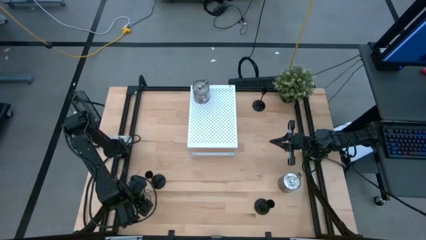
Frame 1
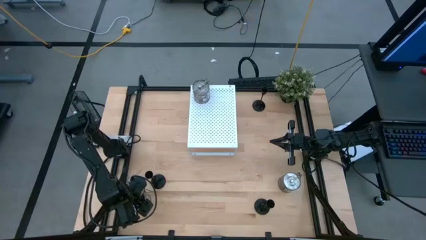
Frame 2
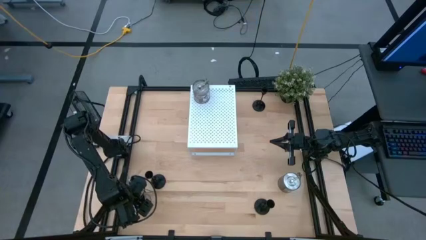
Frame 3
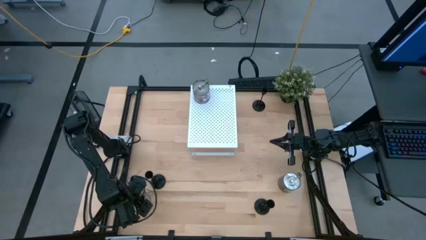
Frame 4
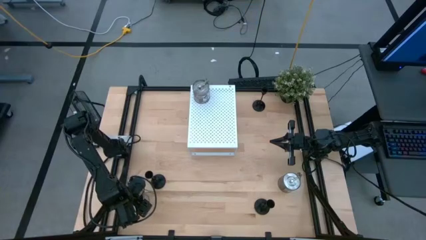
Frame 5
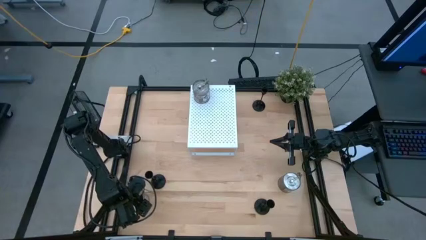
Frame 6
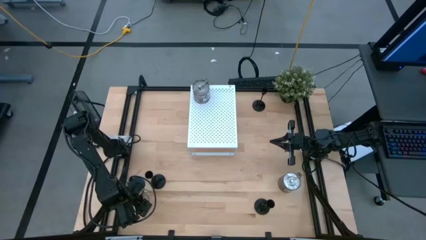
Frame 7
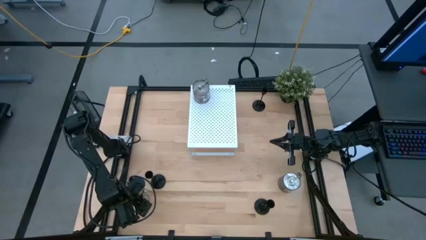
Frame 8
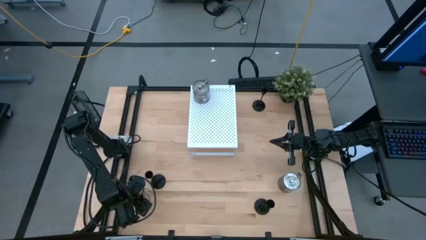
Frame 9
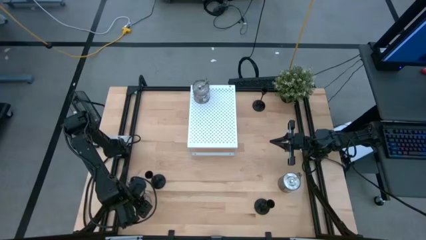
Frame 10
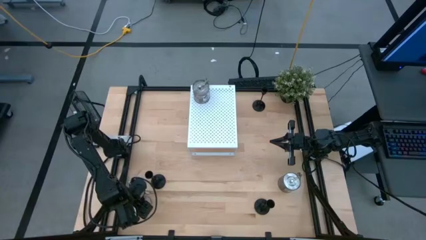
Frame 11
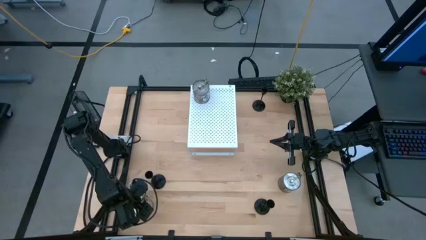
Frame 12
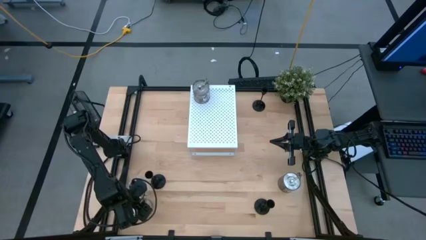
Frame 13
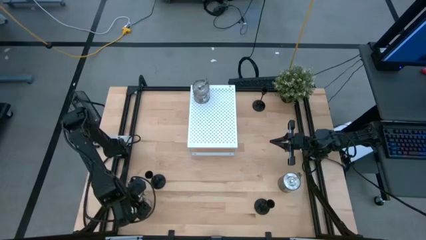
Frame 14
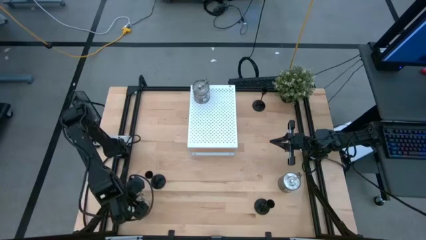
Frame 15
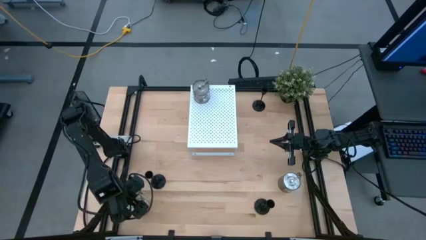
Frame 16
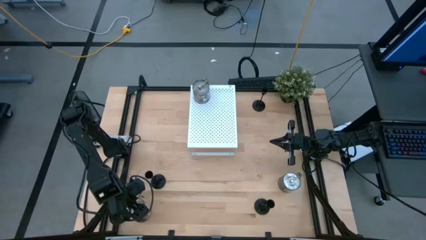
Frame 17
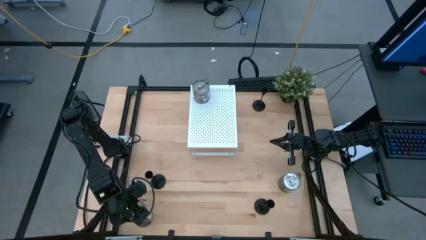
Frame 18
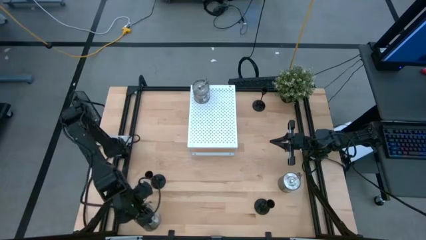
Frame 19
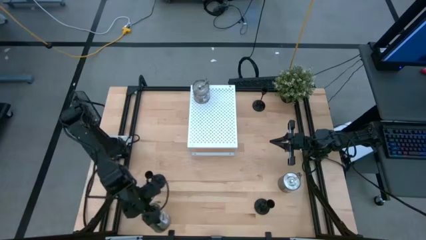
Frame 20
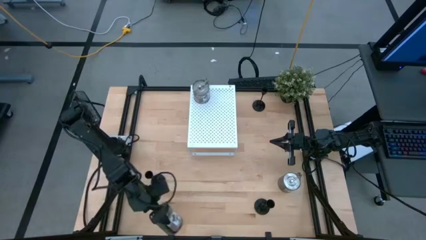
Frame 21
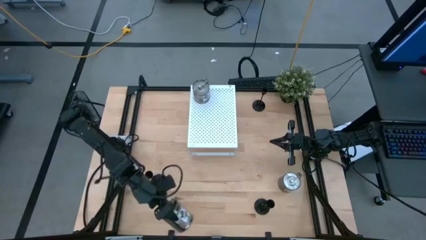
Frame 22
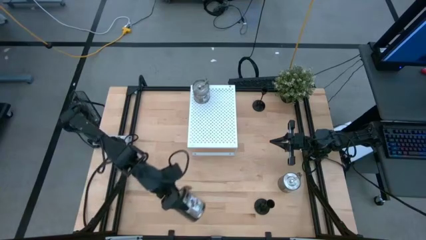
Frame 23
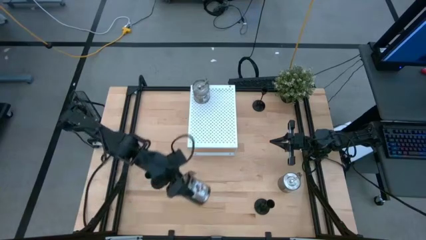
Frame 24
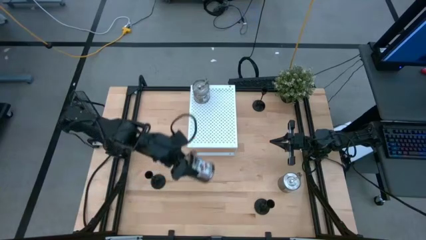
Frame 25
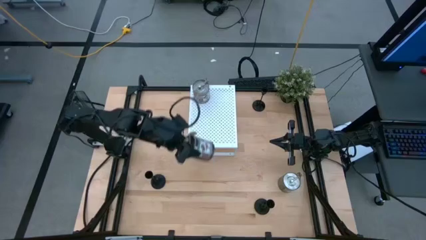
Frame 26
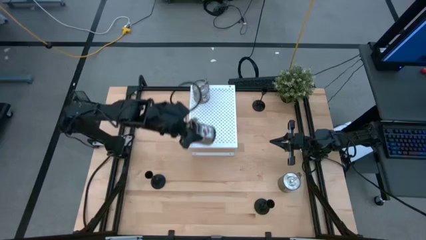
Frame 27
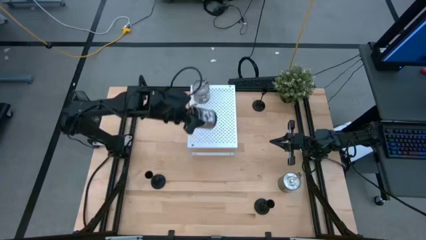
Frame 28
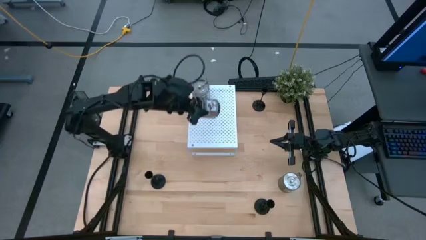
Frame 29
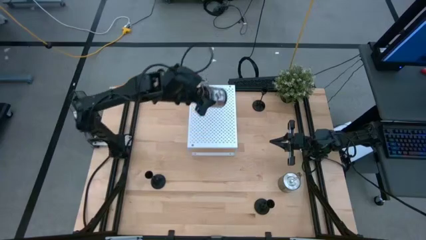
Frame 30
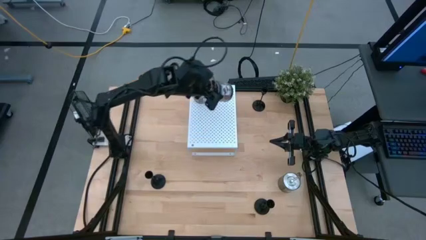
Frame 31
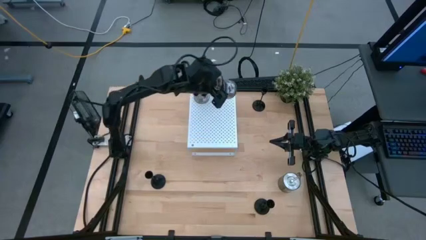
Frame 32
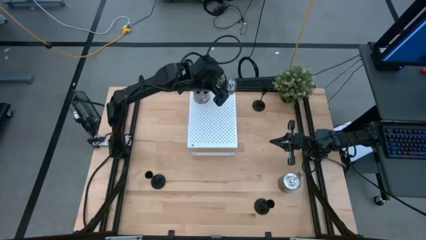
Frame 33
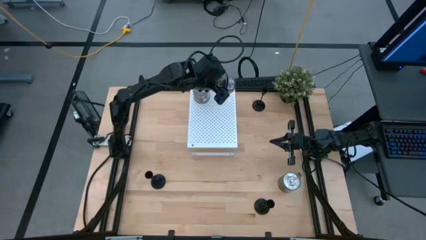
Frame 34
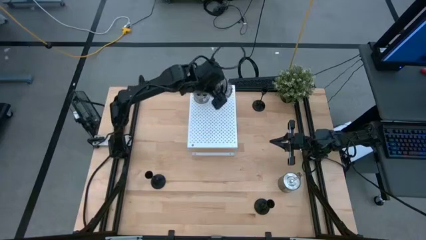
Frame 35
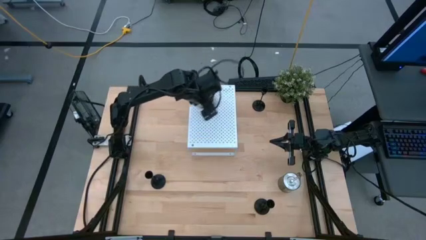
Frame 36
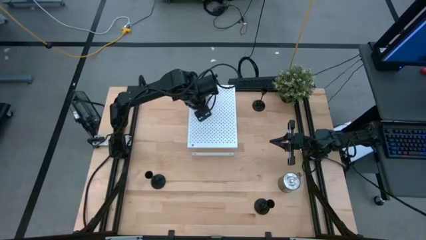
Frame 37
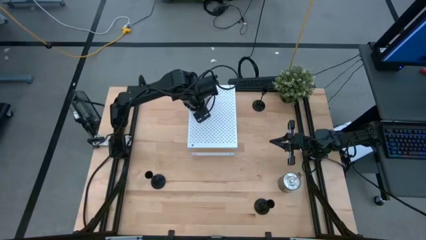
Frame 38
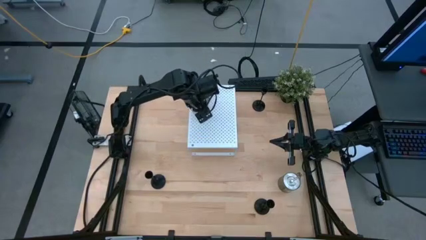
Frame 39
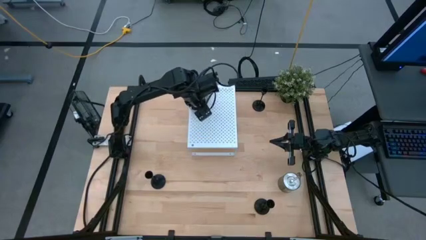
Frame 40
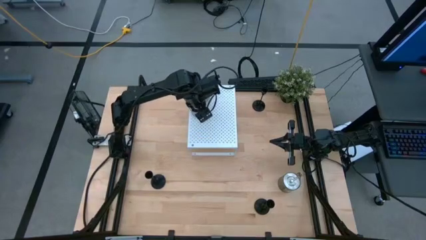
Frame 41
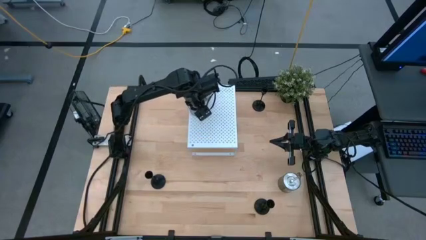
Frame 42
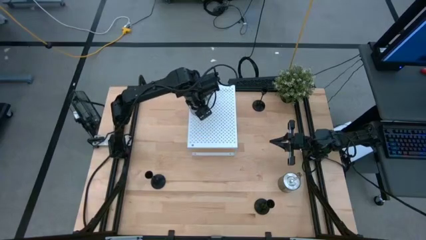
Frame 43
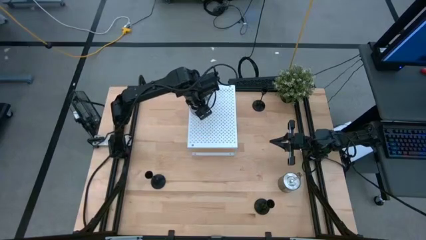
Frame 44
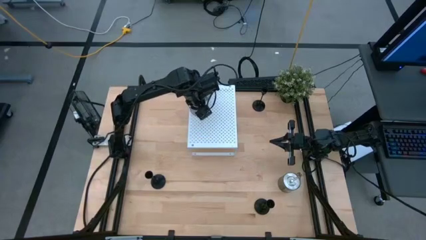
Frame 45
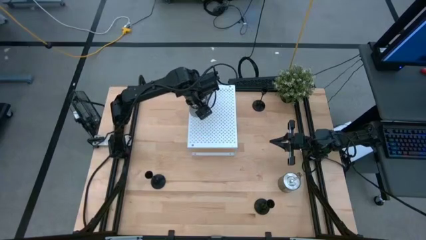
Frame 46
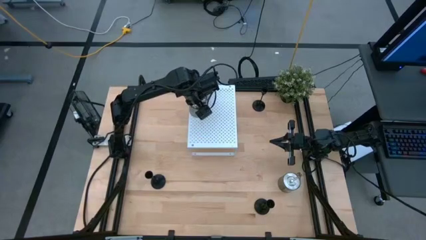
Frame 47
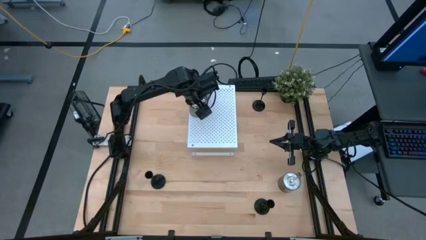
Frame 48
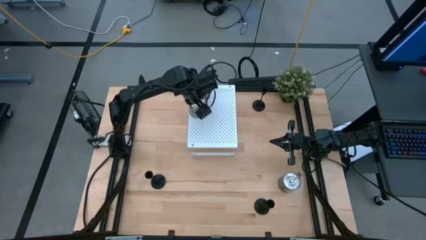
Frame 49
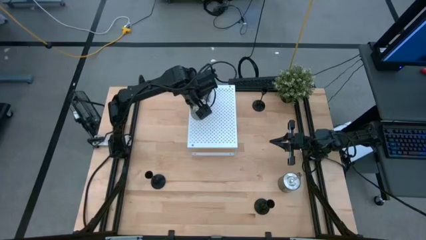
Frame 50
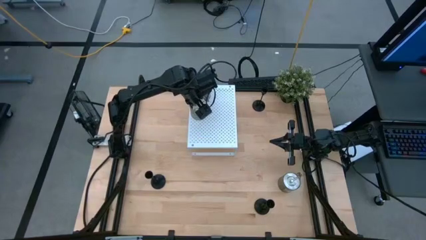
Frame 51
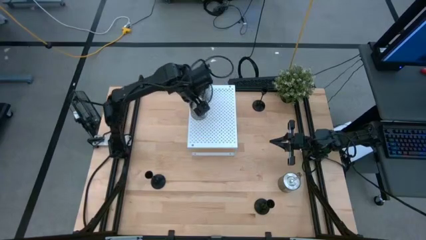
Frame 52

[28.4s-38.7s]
Task: Pick & Place candle stick holders
Put the left silver scented candle on the shelf

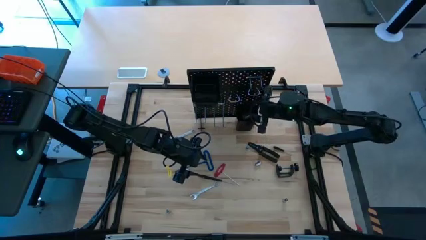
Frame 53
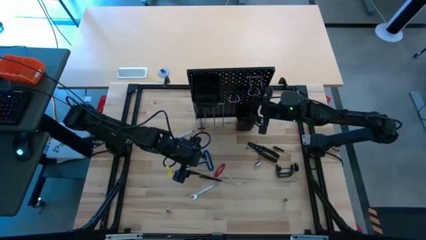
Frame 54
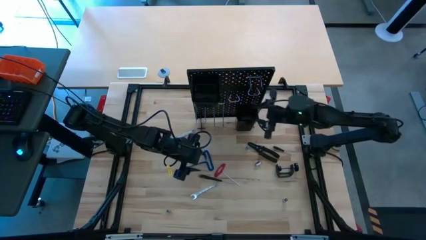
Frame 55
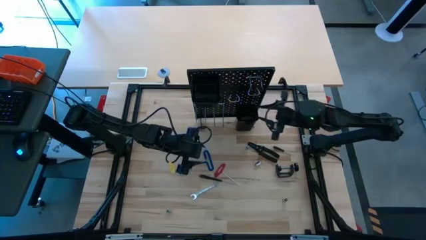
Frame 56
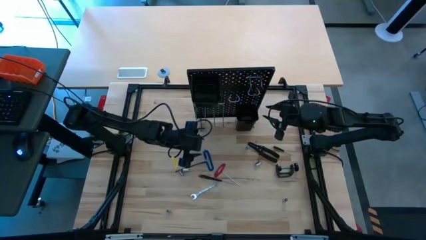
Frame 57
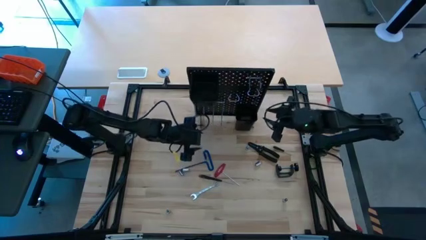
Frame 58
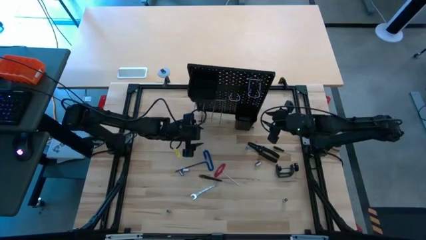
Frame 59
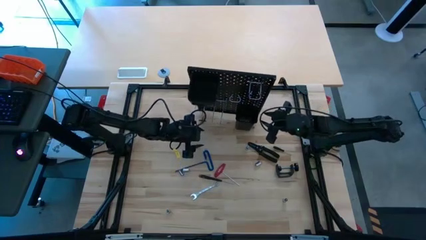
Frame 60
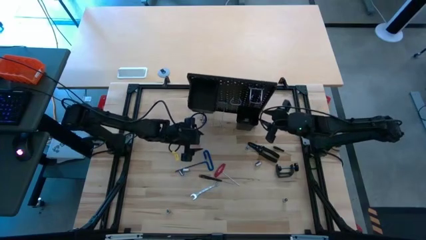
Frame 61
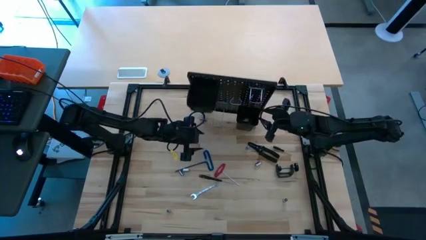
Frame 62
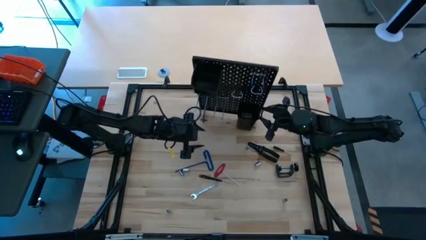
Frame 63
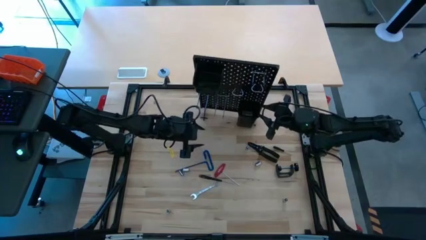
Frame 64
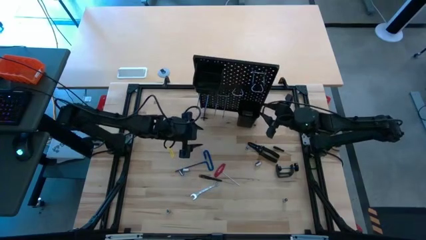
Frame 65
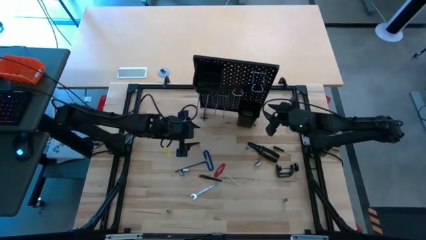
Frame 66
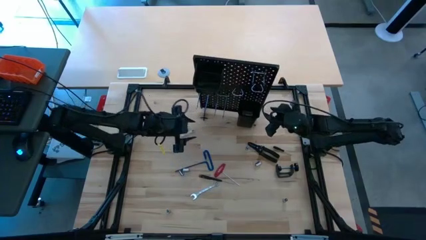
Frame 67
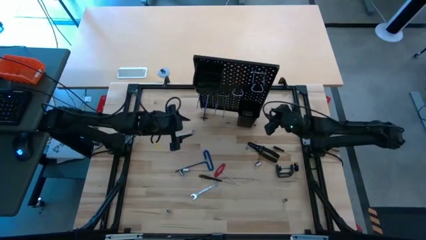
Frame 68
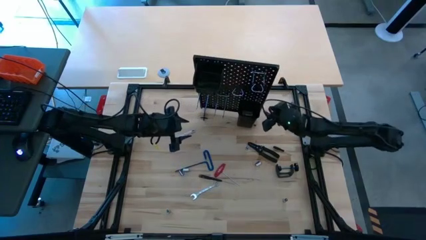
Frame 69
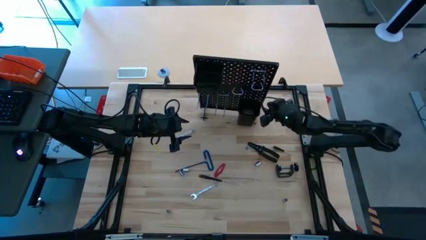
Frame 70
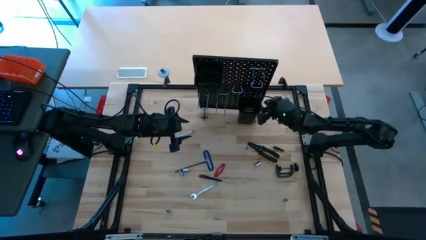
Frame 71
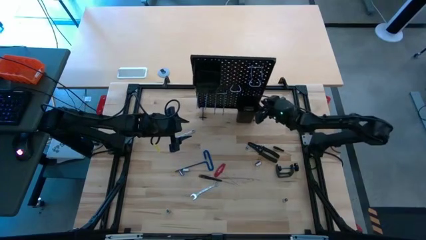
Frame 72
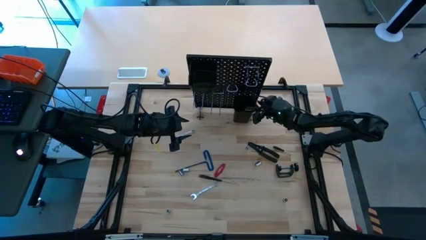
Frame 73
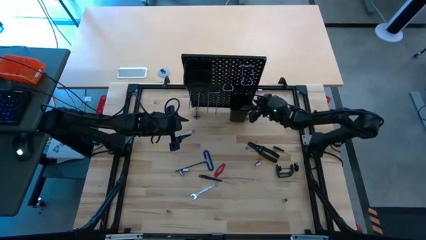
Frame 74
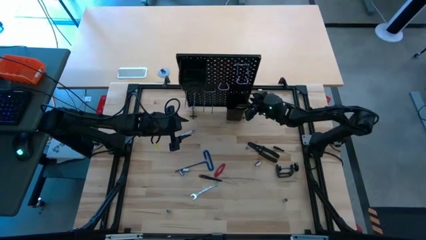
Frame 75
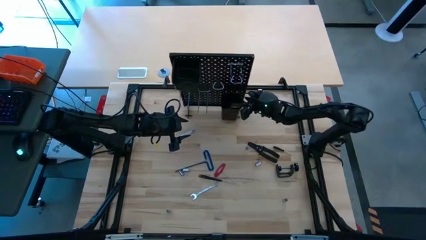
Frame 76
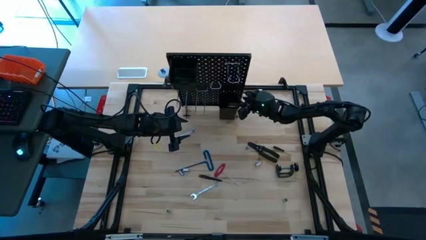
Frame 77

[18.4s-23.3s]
Task: Hang tools onto peg board
Adjust the pegboard
